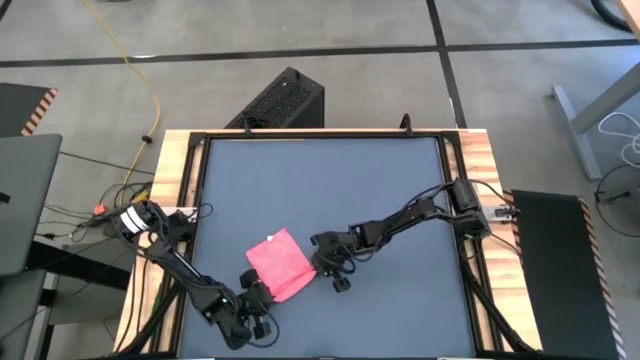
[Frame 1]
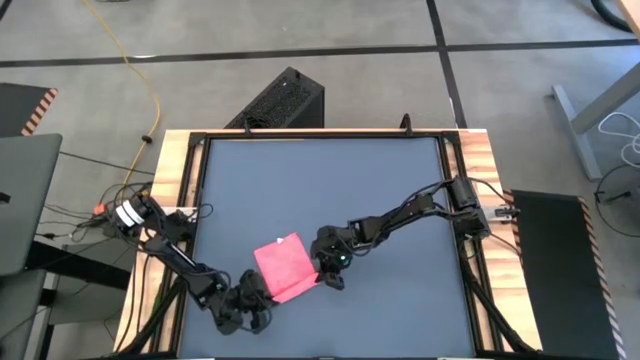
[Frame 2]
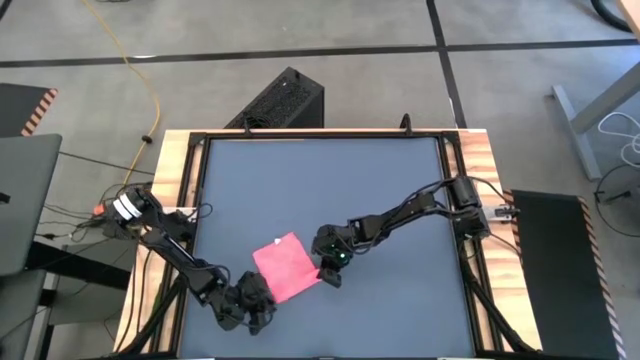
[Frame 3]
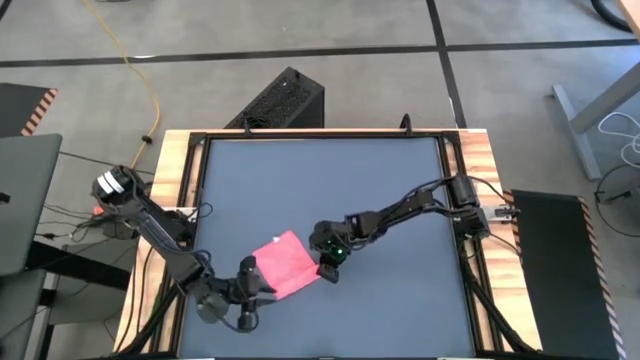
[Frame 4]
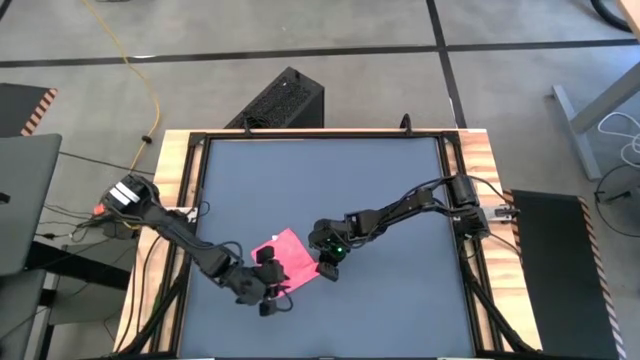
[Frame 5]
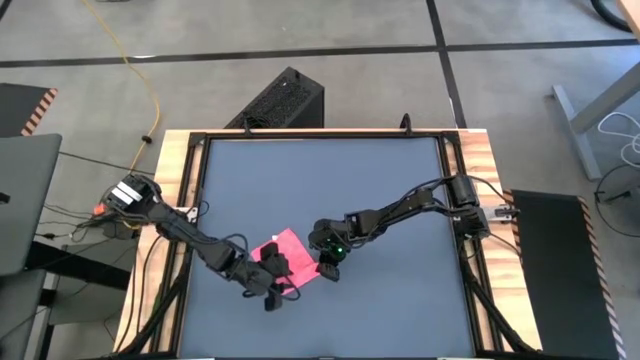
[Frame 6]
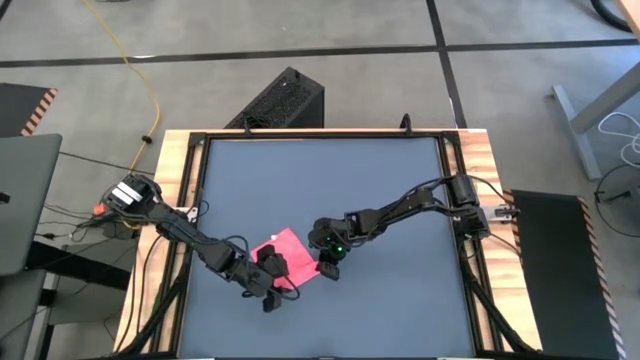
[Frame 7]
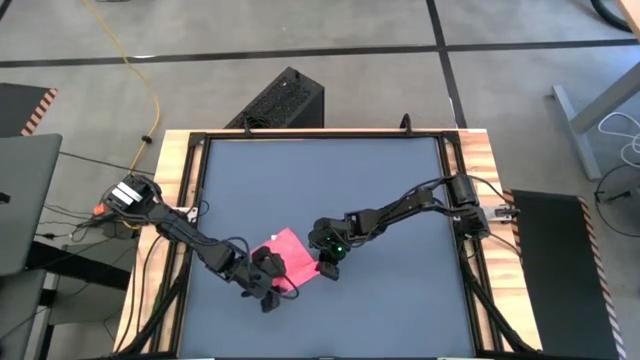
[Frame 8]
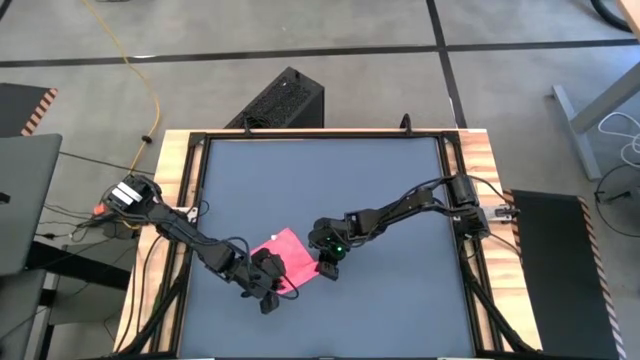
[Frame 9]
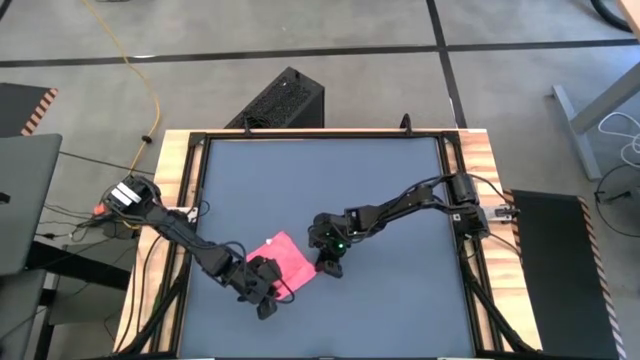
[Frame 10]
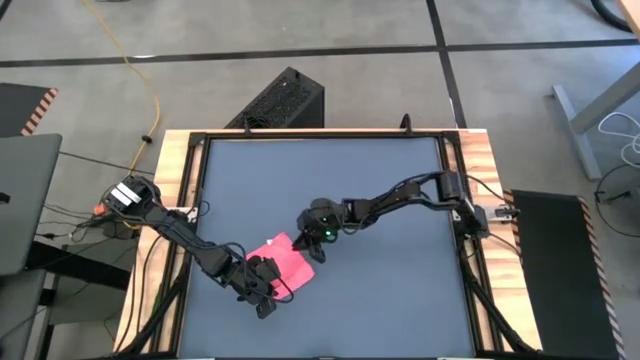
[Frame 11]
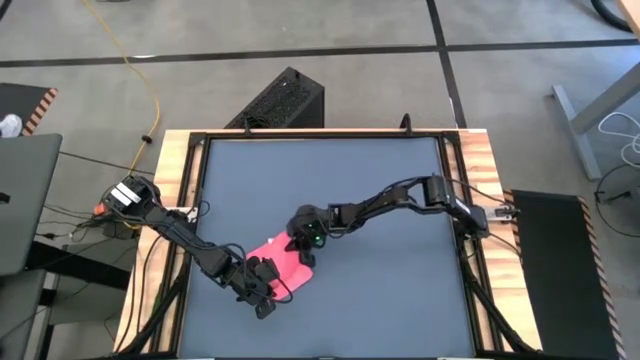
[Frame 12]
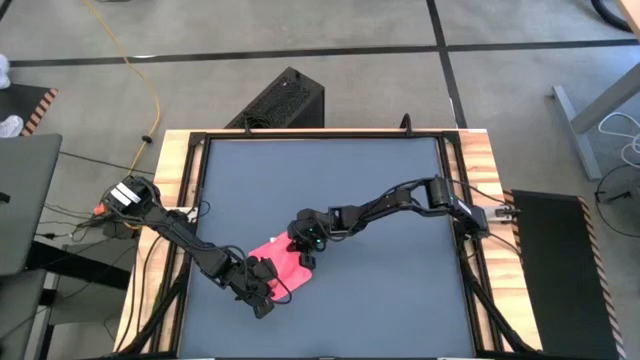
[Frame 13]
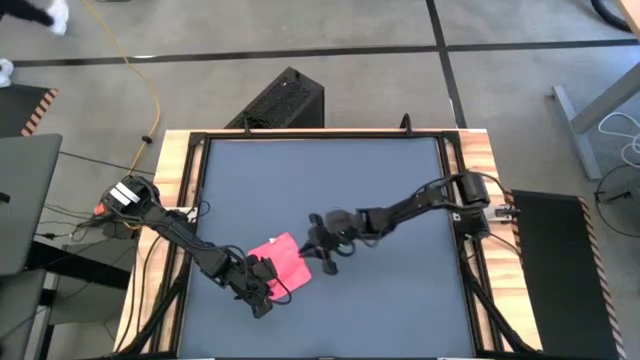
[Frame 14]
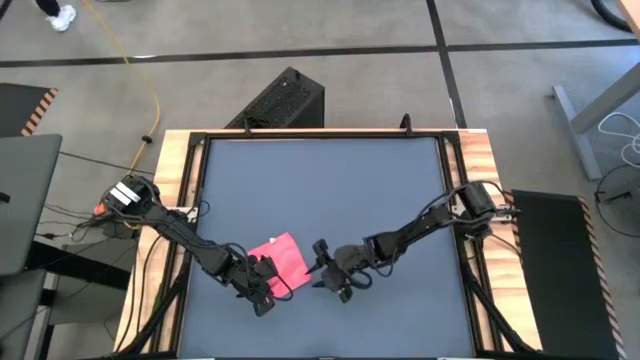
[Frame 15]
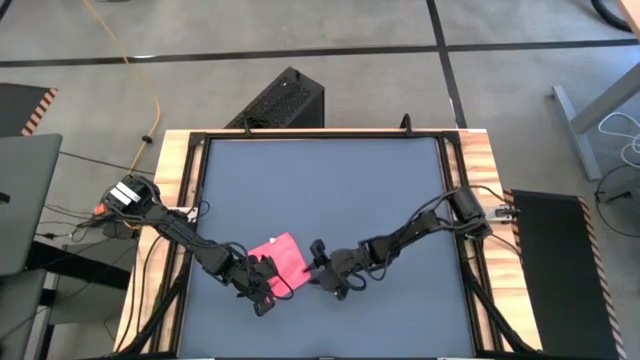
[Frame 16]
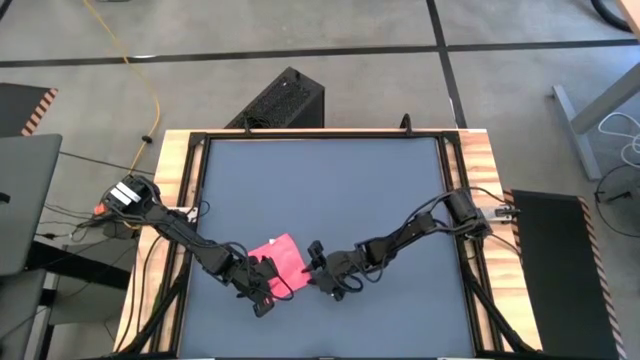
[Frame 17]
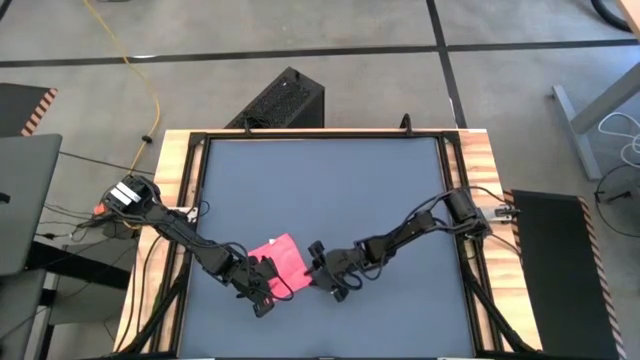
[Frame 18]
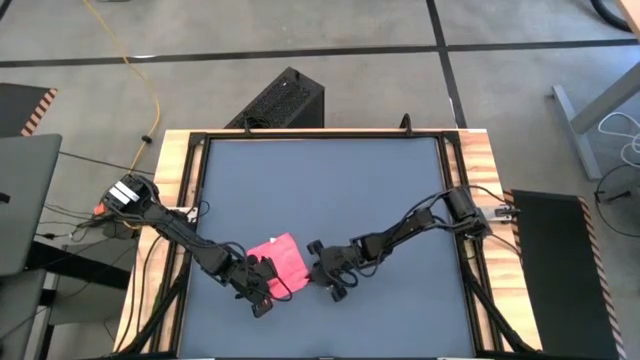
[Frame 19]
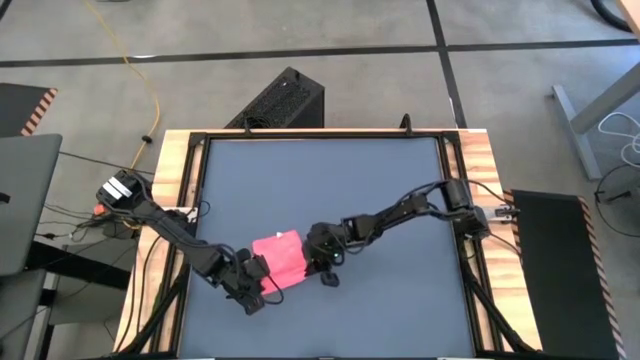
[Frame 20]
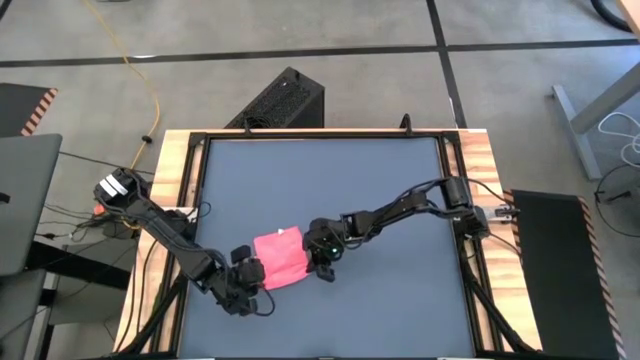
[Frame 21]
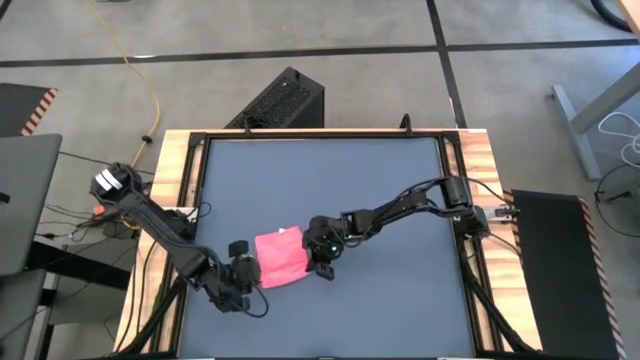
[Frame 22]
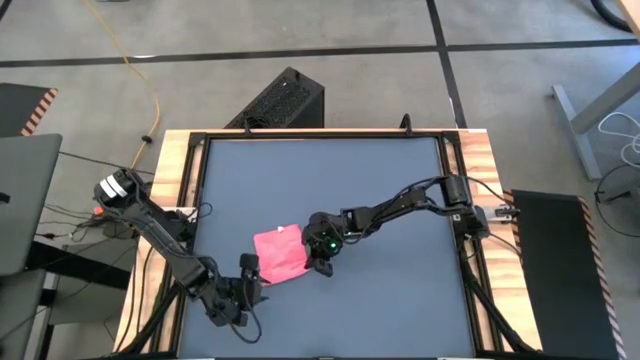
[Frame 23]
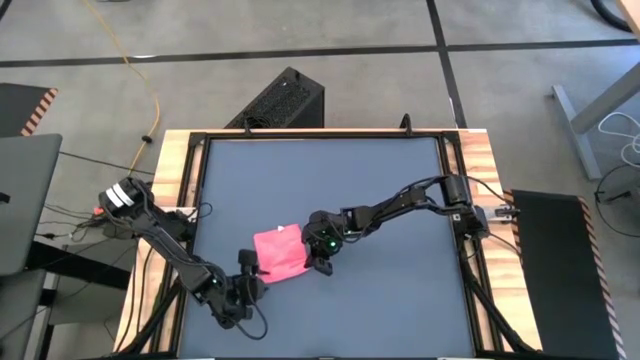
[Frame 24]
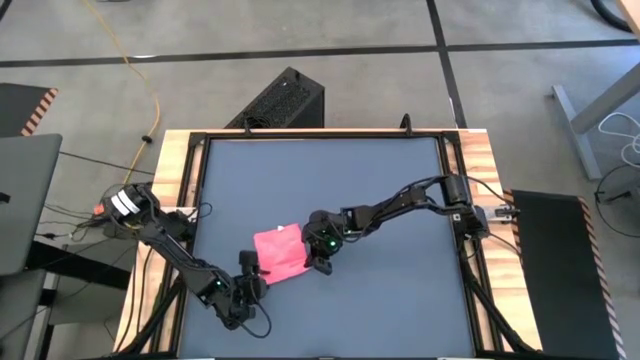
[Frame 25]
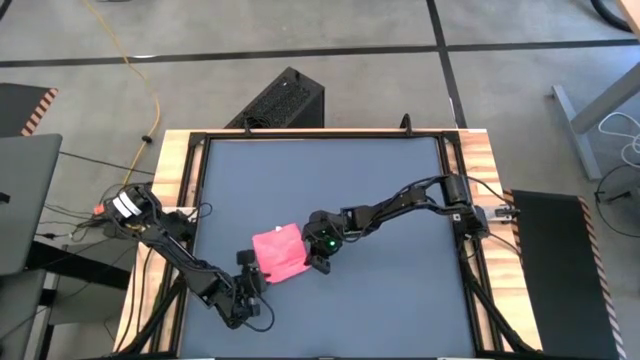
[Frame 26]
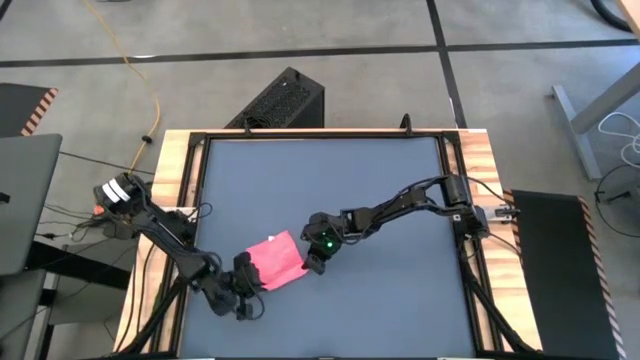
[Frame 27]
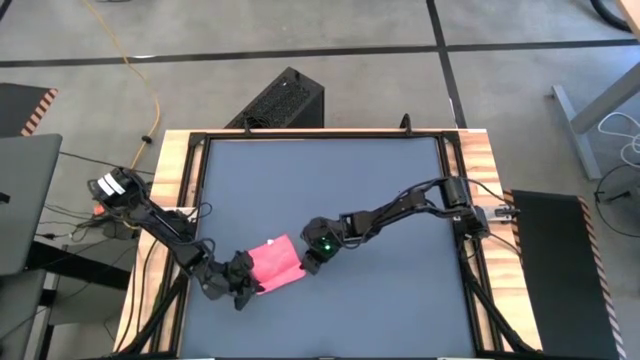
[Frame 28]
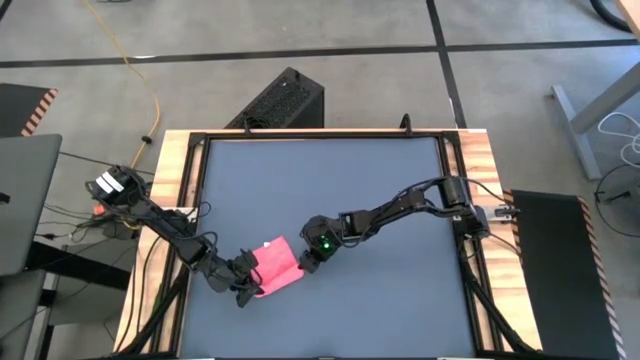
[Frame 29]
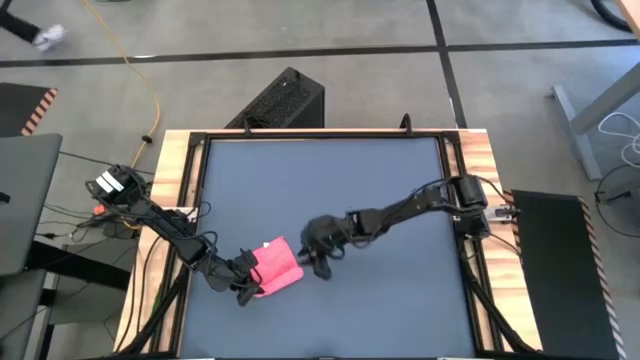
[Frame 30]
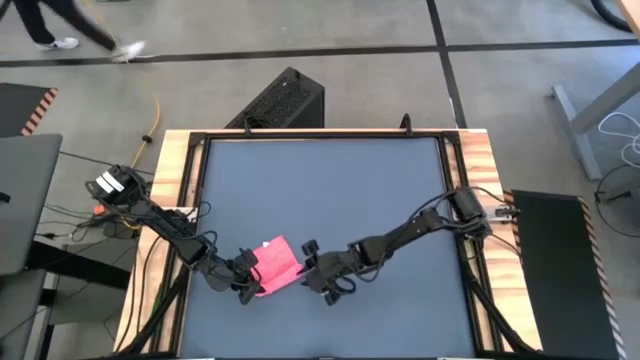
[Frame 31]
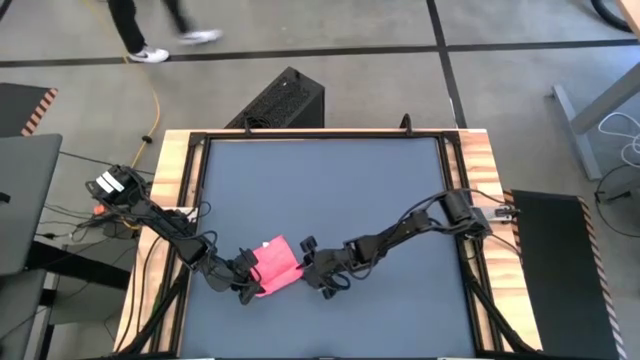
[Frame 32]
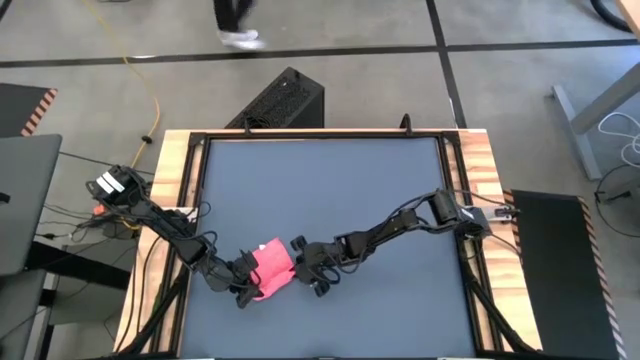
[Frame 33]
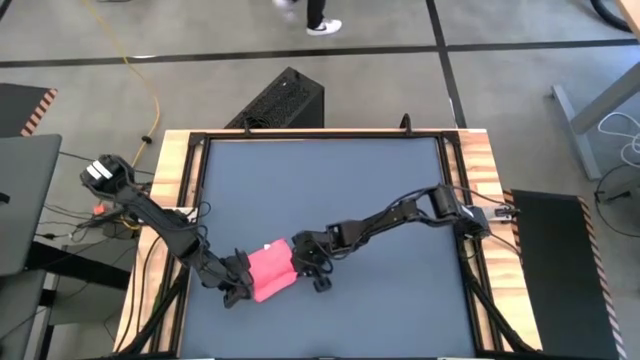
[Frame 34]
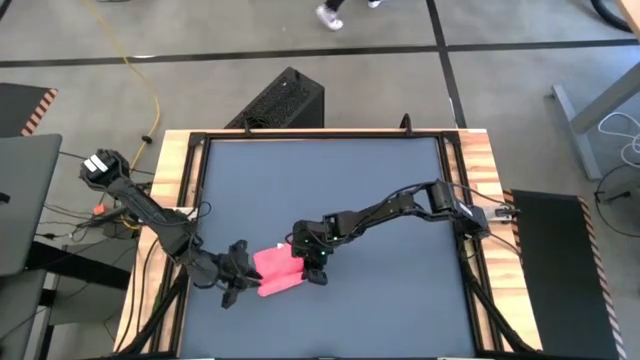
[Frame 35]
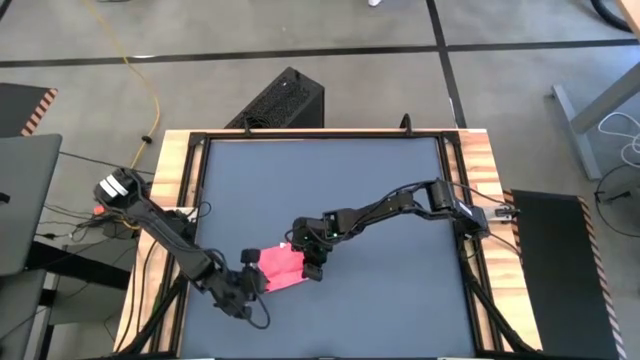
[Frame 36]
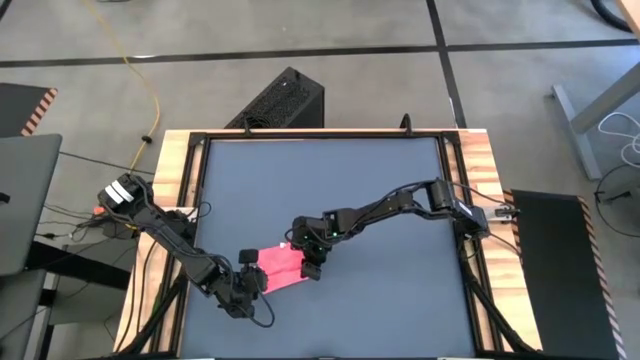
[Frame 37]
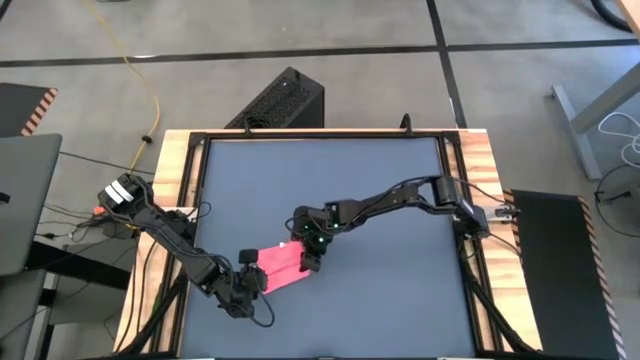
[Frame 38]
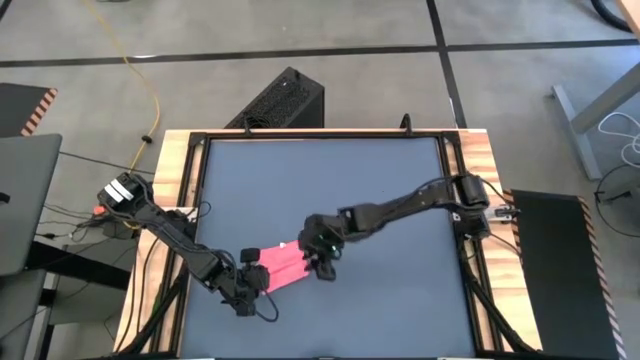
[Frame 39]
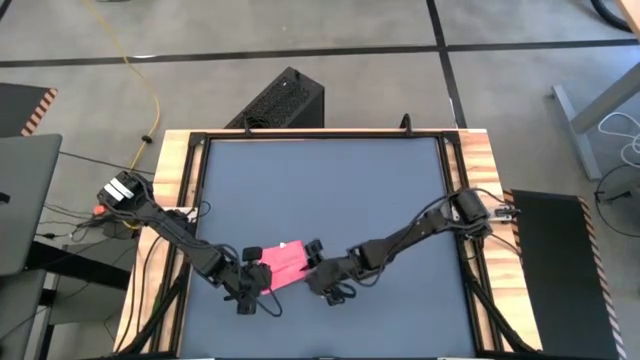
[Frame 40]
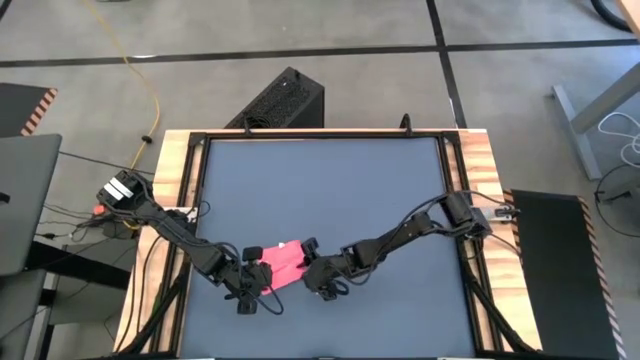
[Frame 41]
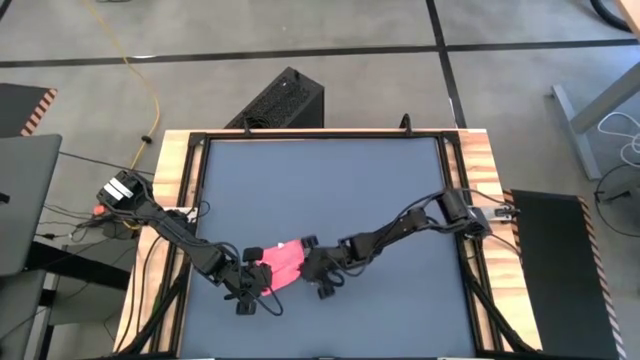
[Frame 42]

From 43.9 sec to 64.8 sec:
Task: Roll towel
Roll the red towel
